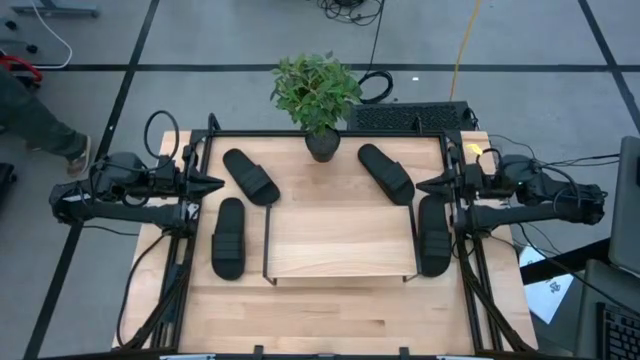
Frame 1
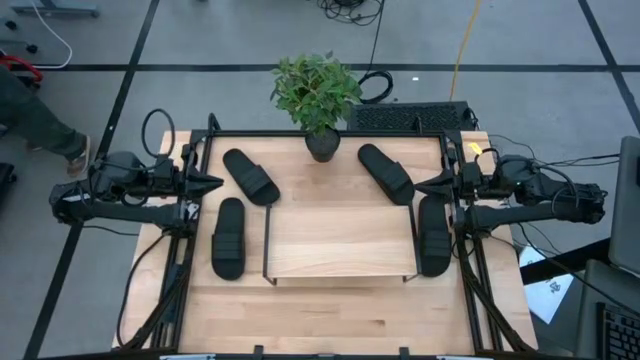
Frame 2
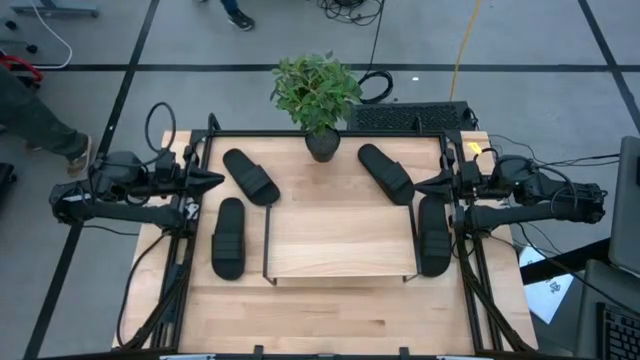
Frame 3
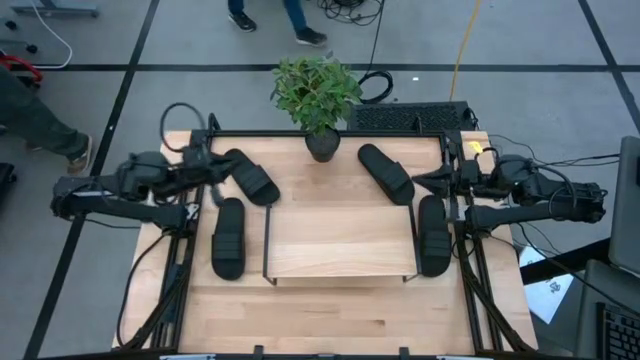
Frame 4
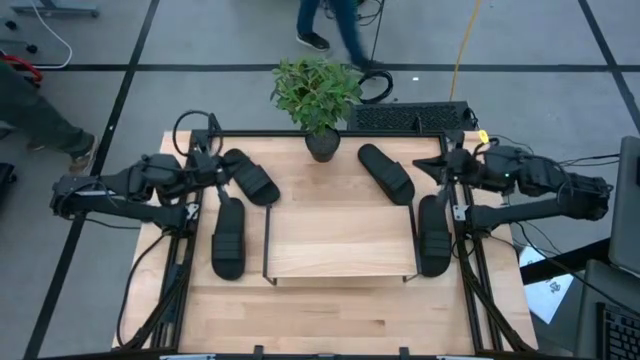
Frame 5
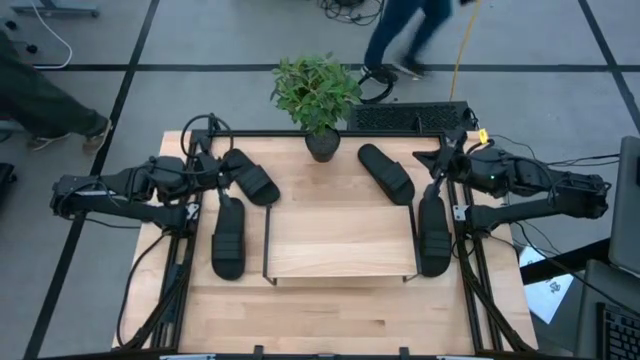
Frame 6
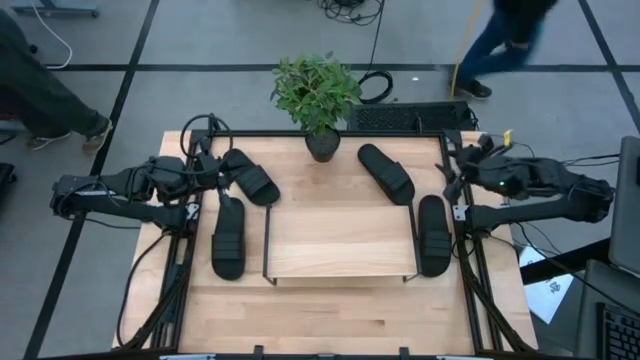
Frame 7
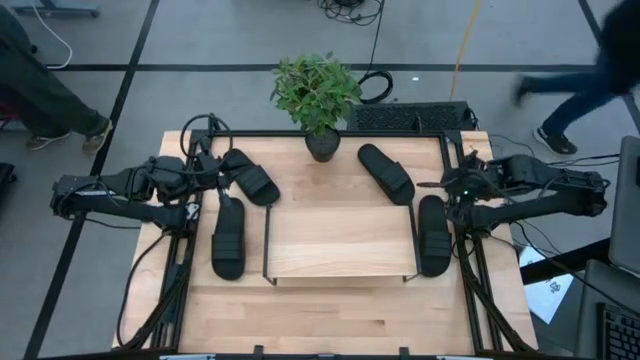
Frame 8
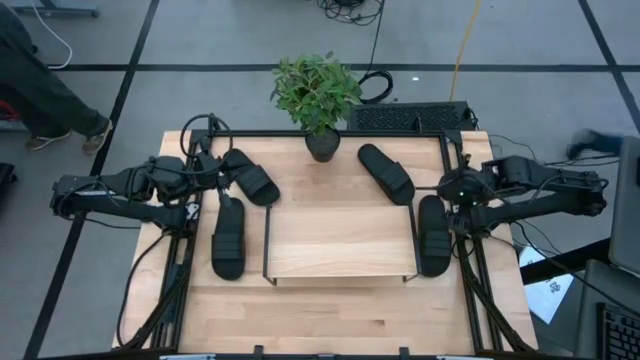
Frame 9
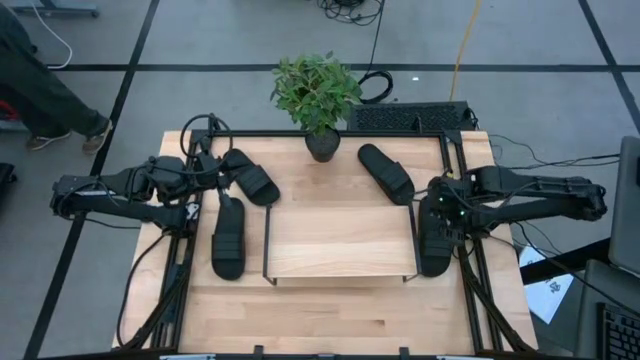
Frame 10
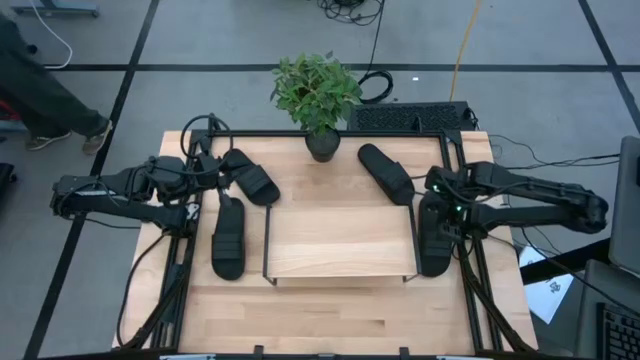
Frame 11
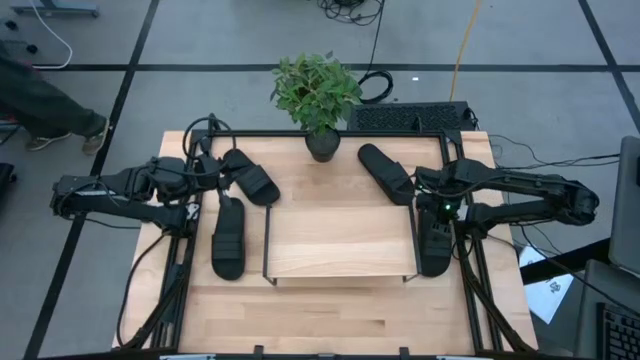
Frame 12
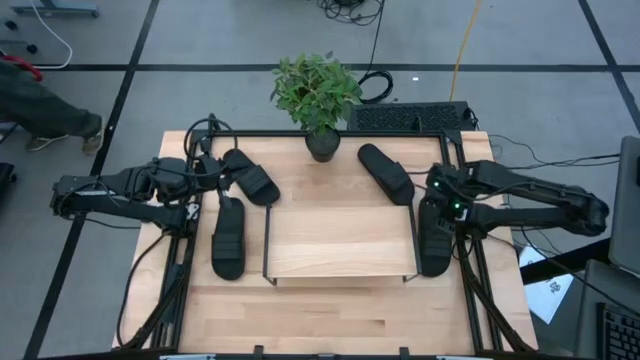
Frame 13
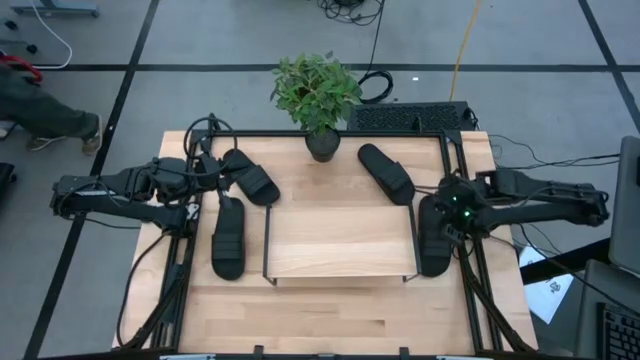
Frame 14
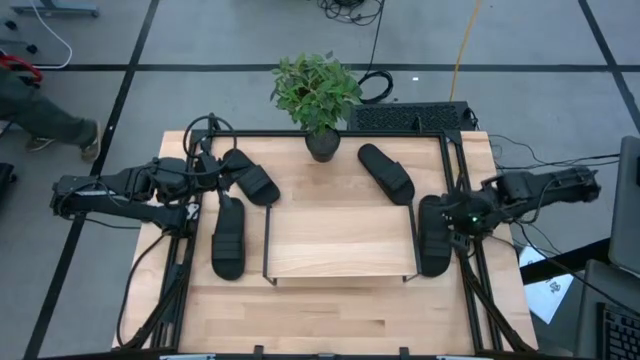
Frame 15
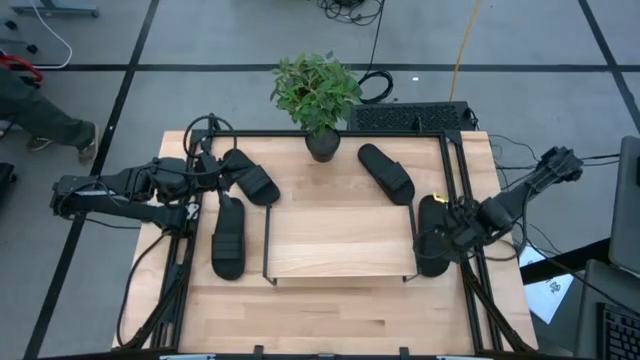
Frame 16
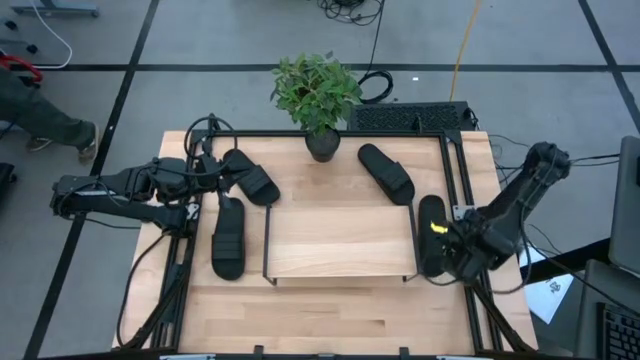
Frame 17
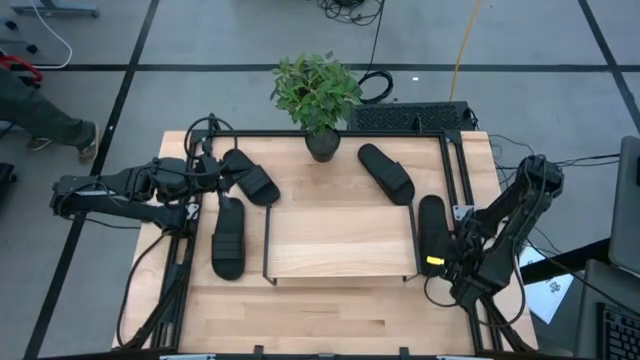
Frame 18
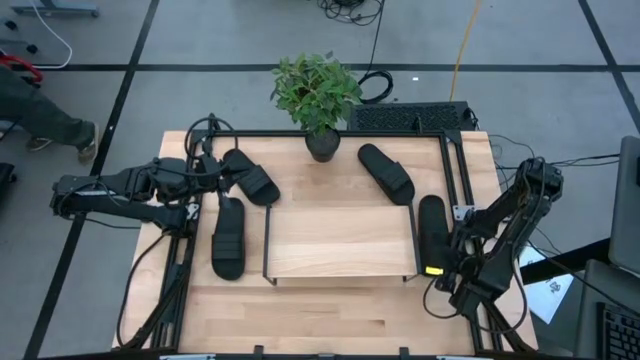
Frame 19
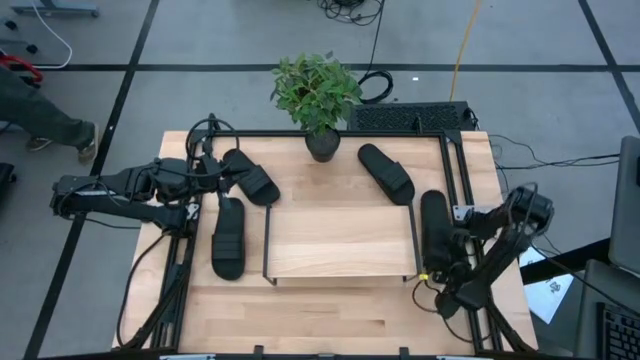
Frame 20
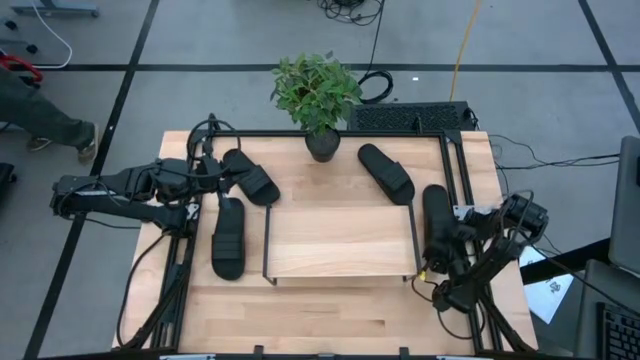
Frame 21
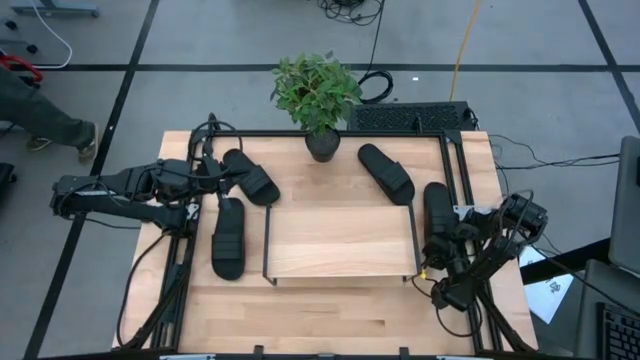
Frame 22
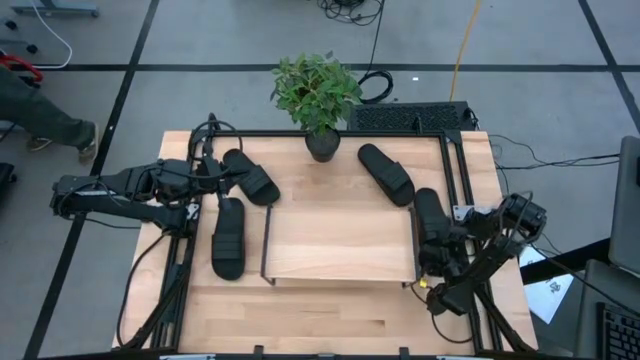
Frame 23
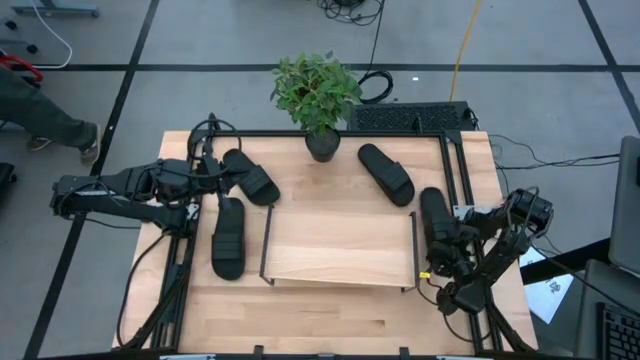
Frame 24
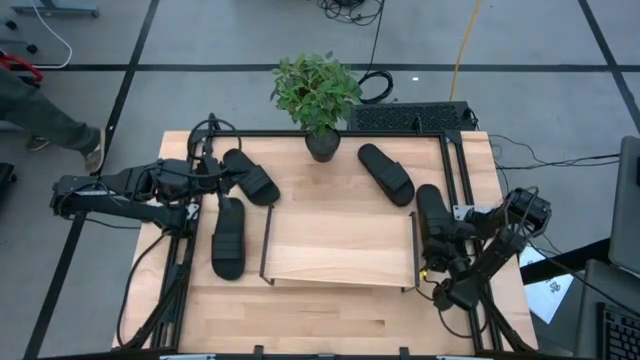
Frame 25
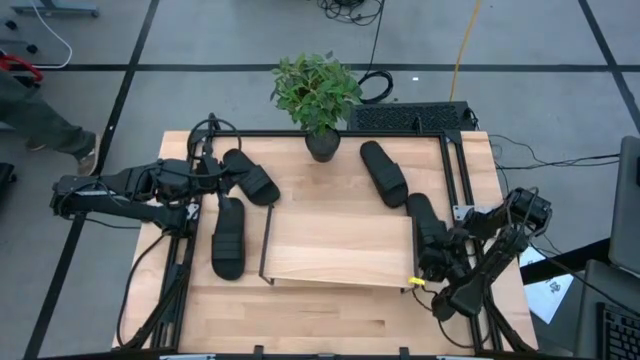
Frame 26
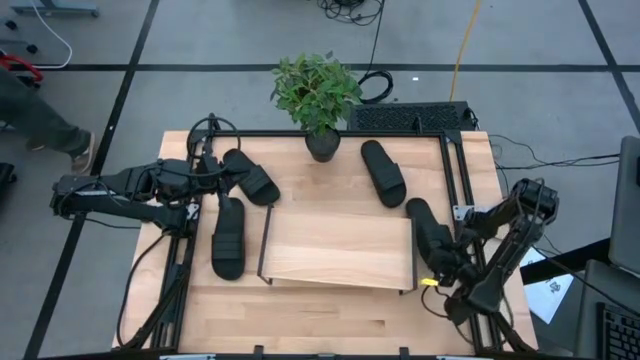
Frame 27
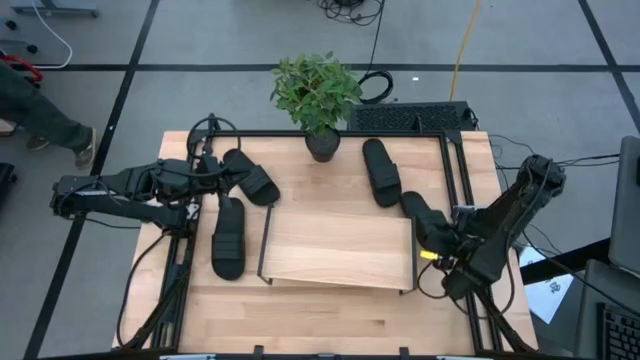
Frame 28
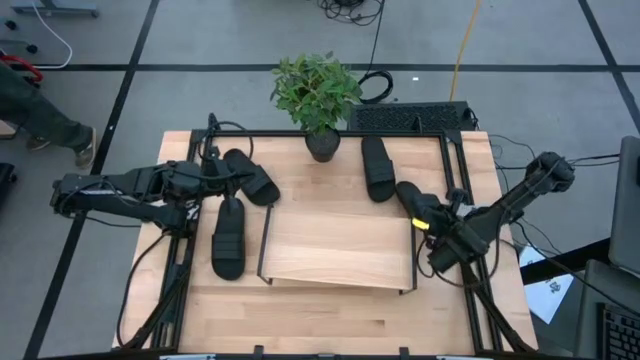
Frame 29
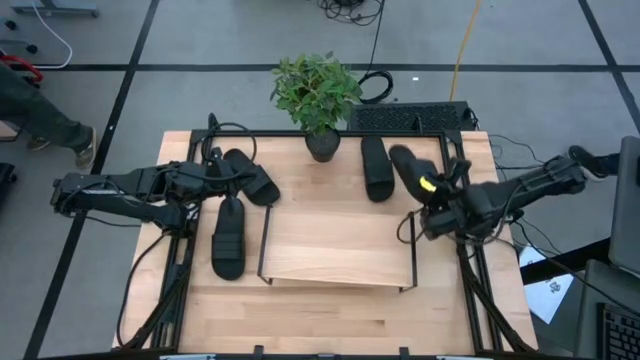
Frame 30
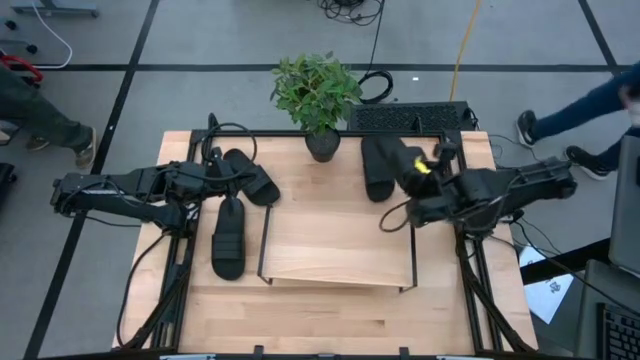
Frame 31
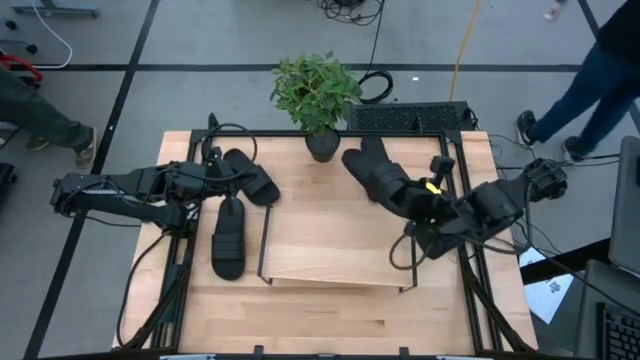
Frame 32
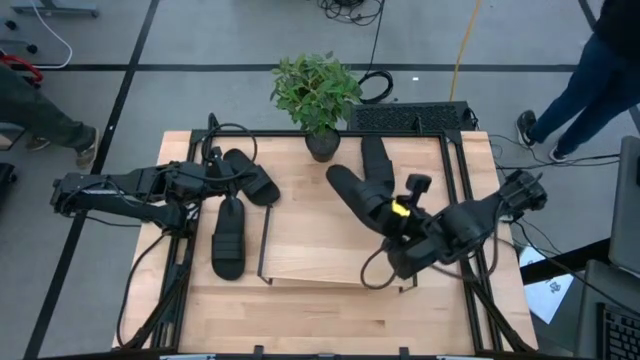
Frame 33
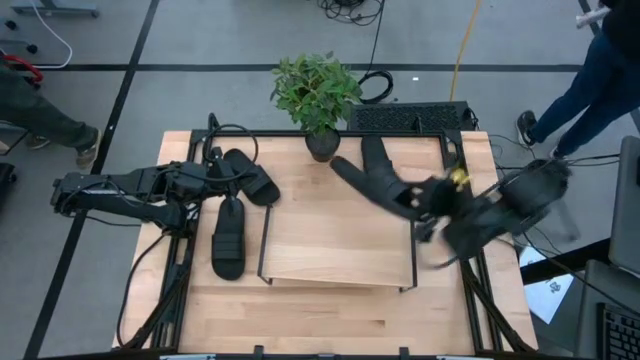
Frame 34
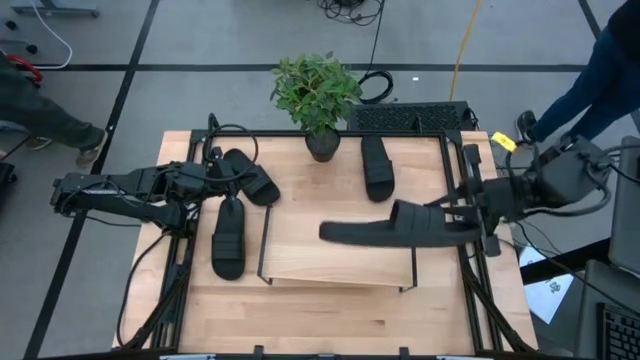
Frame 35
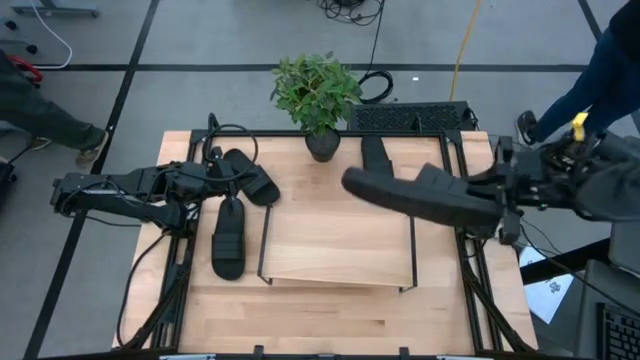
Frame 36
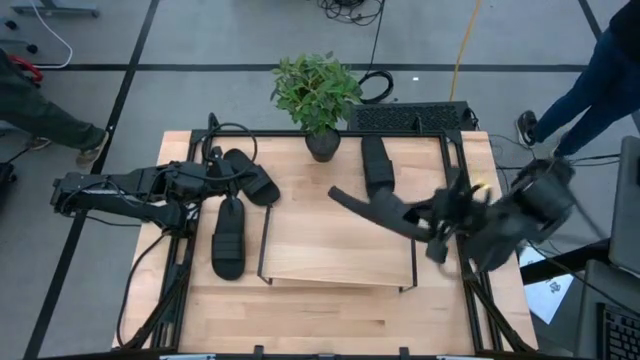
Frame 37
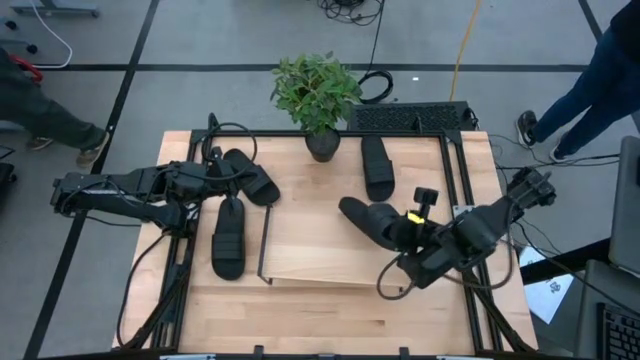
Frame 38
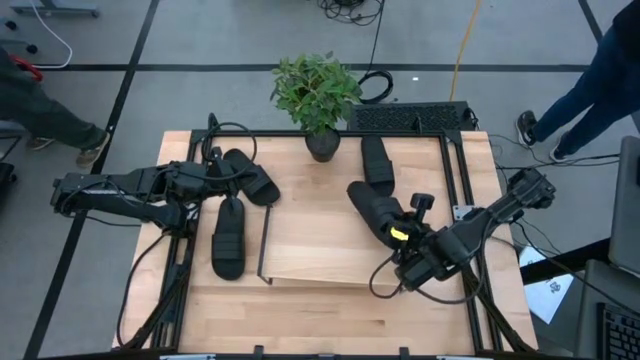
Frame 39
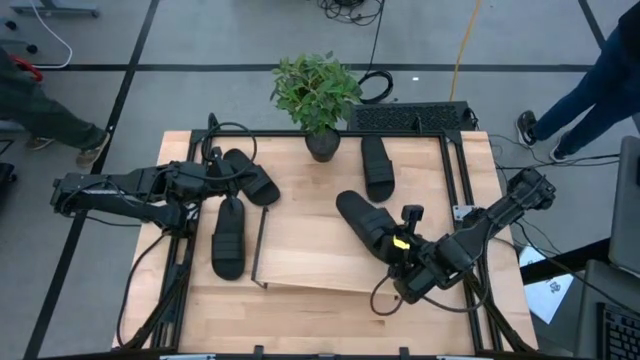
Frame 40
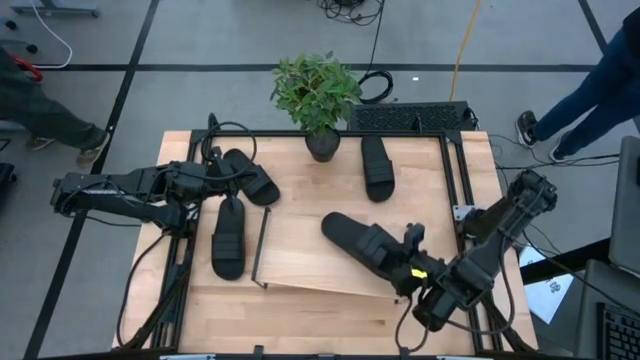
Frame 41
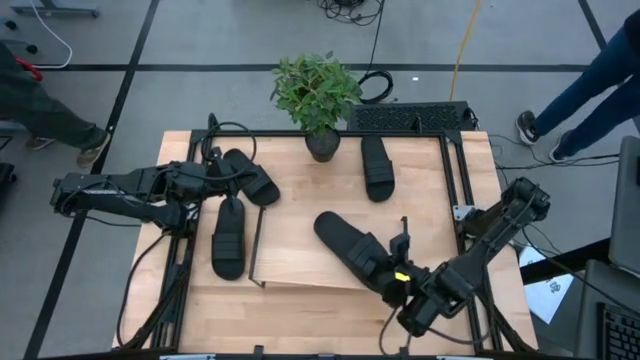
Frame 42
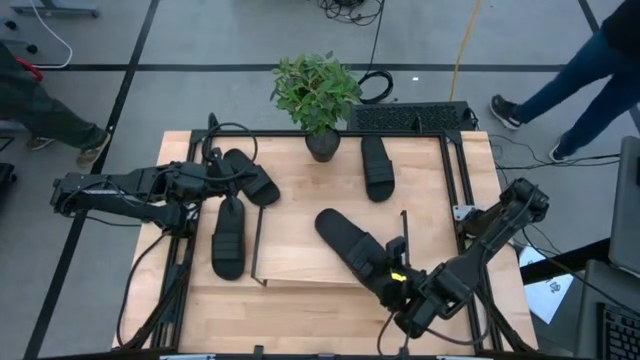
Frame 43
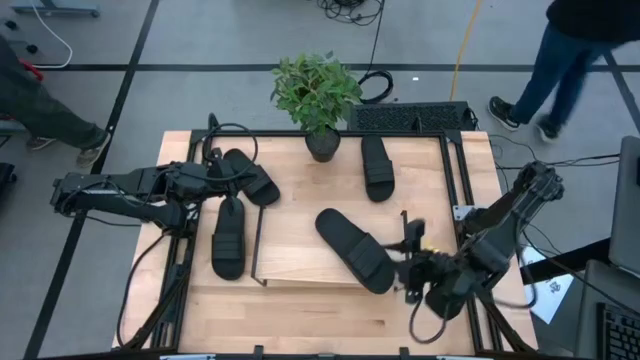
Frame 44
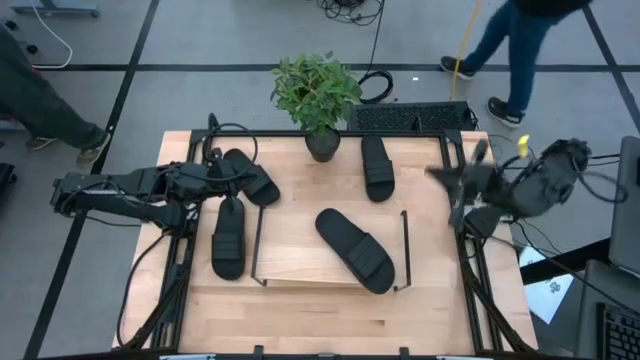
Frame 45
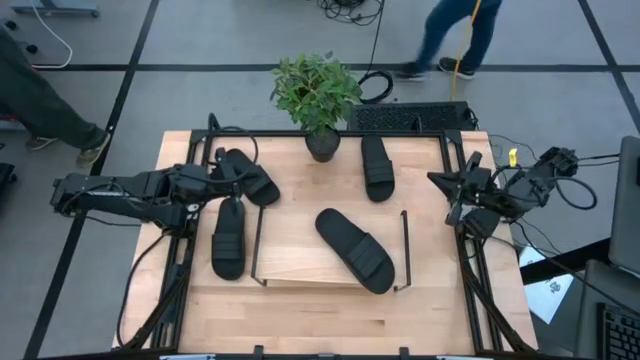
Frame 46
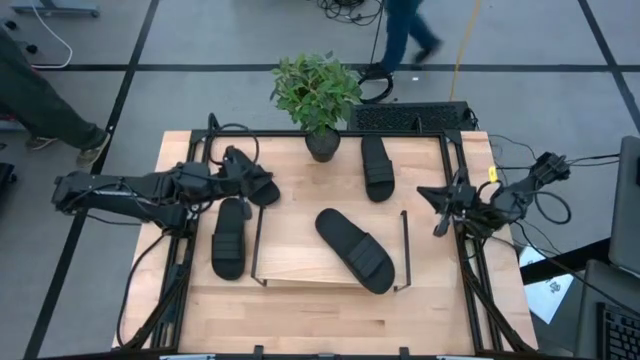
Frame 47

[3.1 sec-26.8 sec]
Task: Pick and place slides into the shelf
Put the black slipper on the shelf
